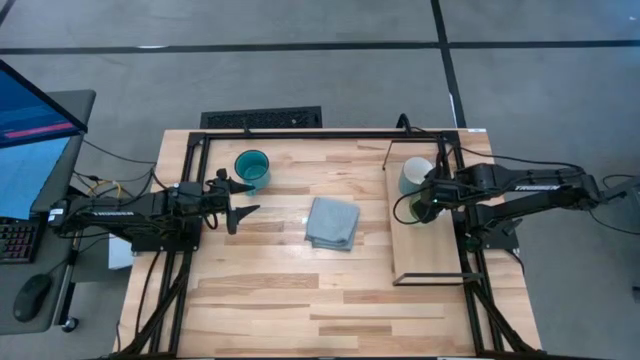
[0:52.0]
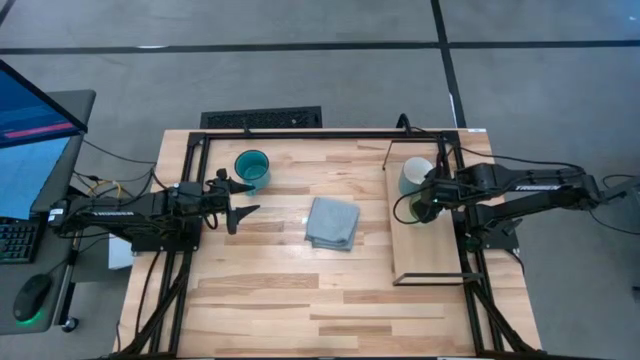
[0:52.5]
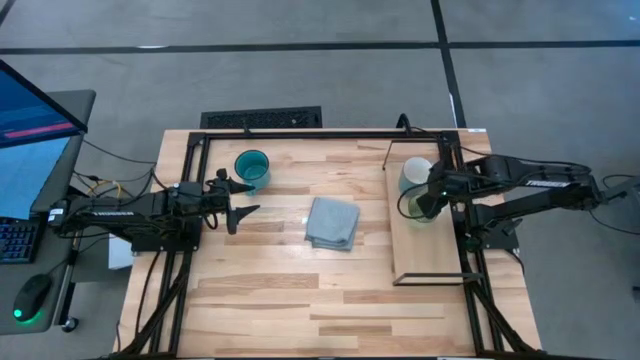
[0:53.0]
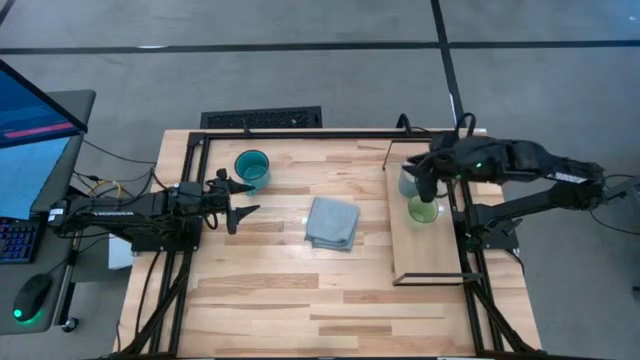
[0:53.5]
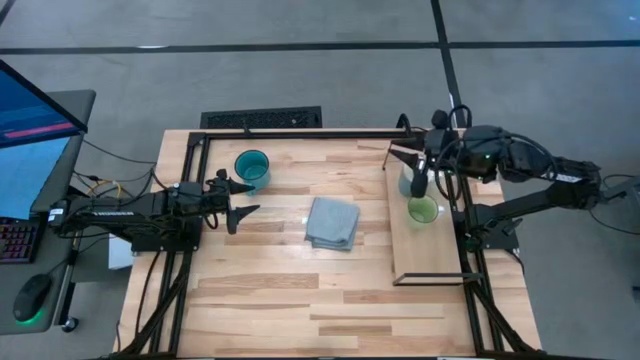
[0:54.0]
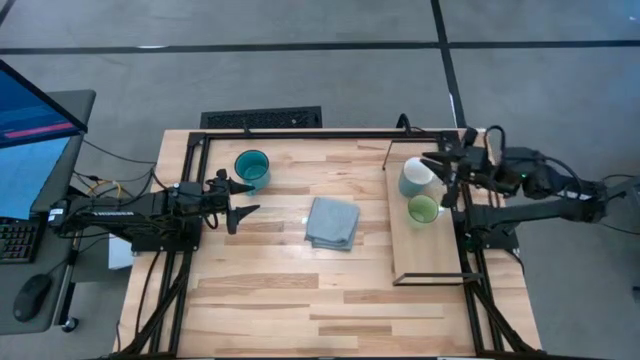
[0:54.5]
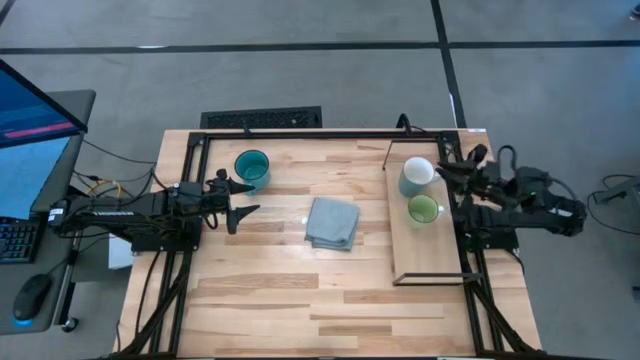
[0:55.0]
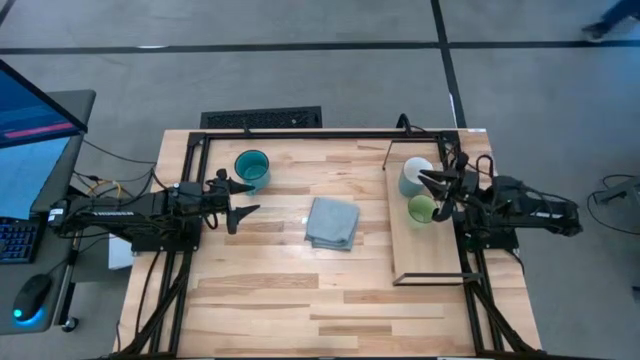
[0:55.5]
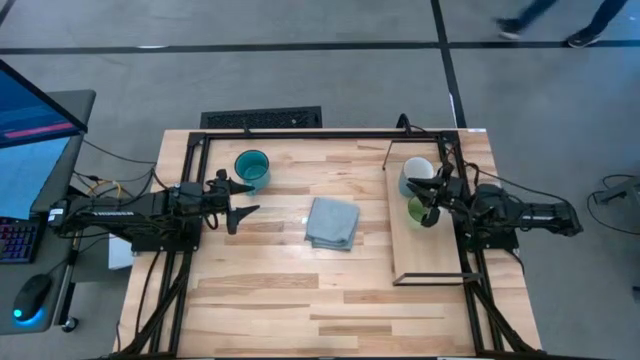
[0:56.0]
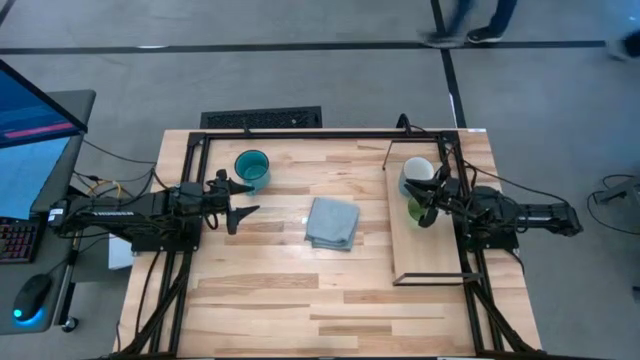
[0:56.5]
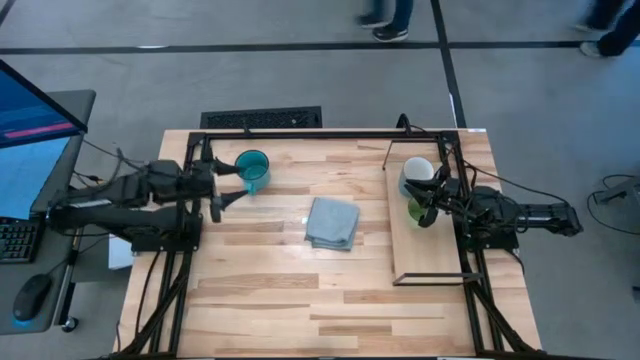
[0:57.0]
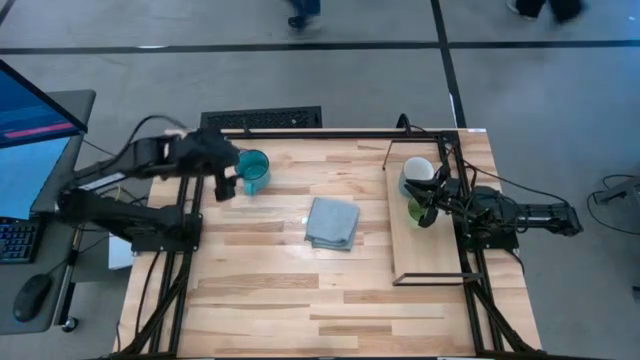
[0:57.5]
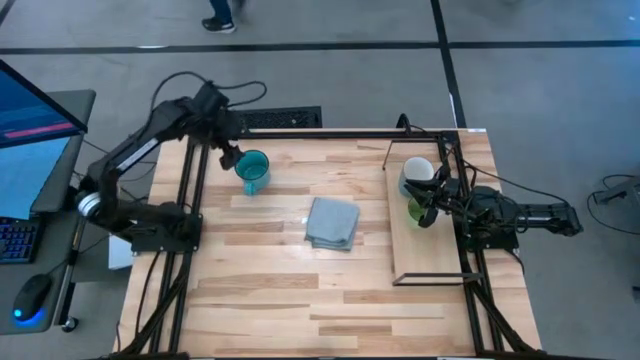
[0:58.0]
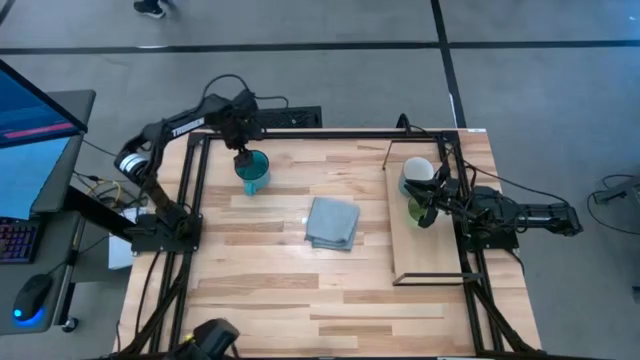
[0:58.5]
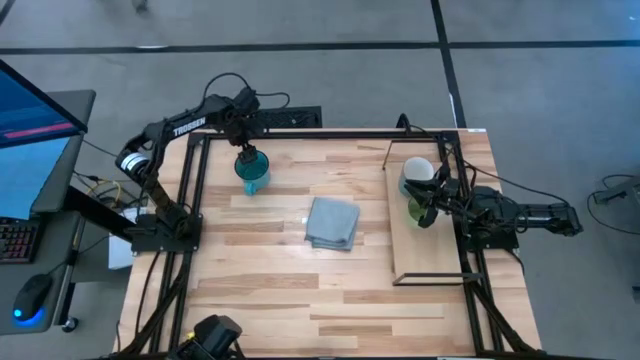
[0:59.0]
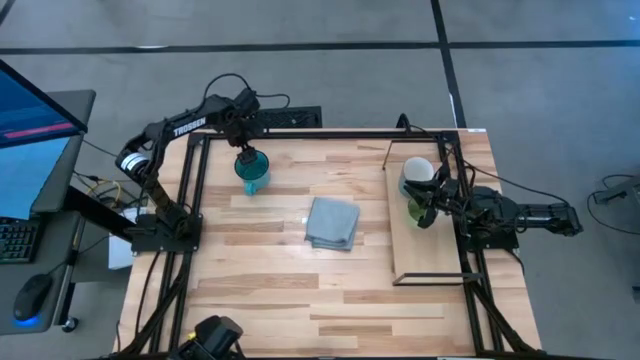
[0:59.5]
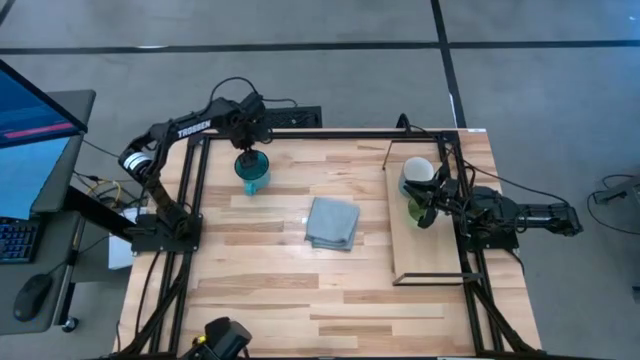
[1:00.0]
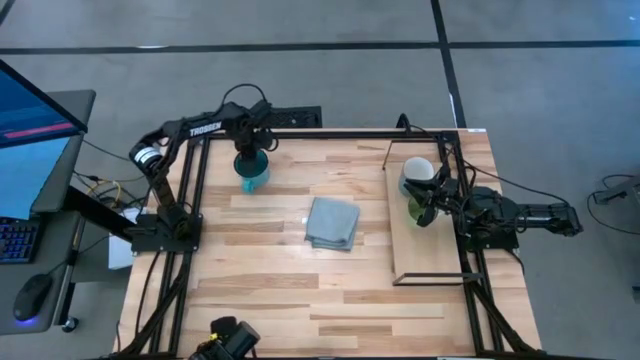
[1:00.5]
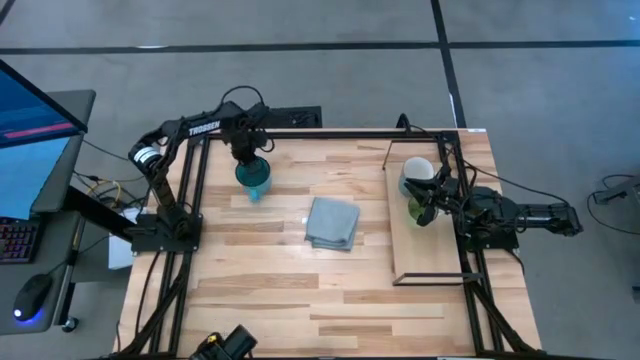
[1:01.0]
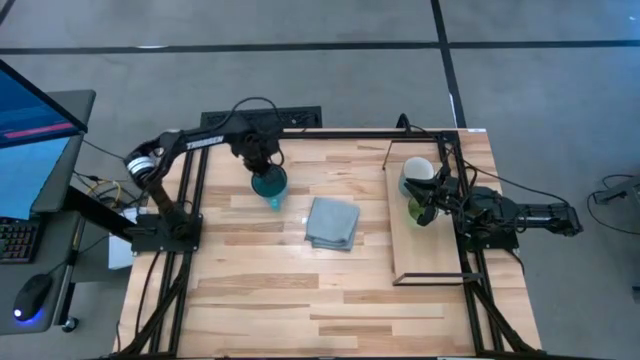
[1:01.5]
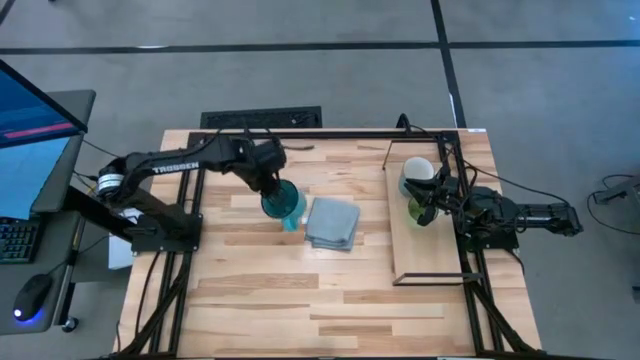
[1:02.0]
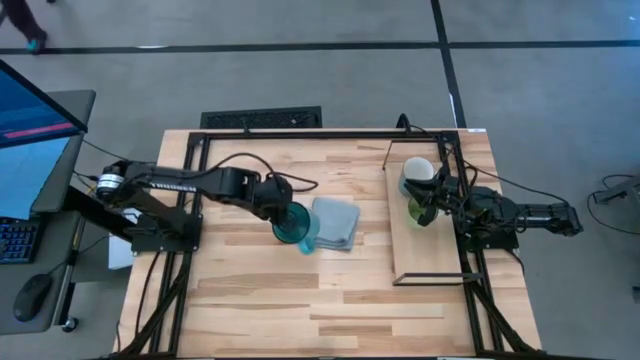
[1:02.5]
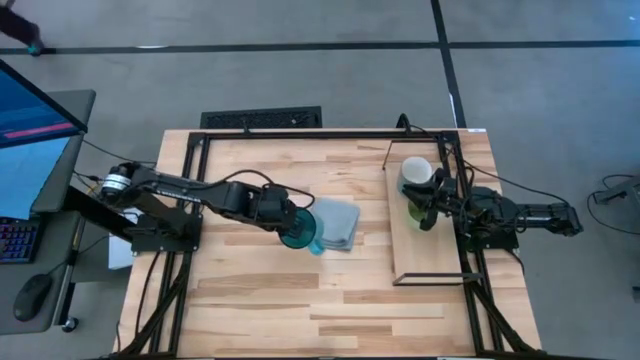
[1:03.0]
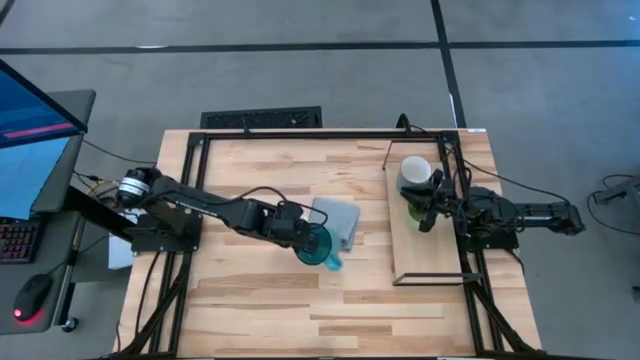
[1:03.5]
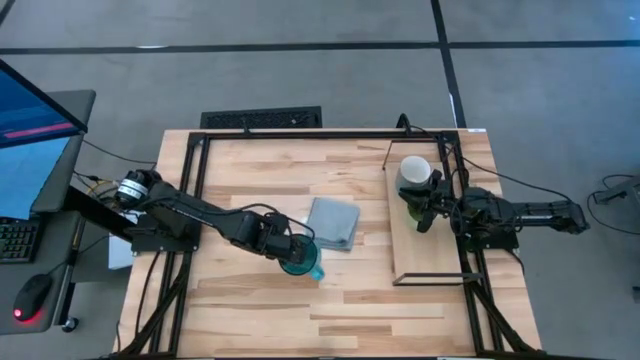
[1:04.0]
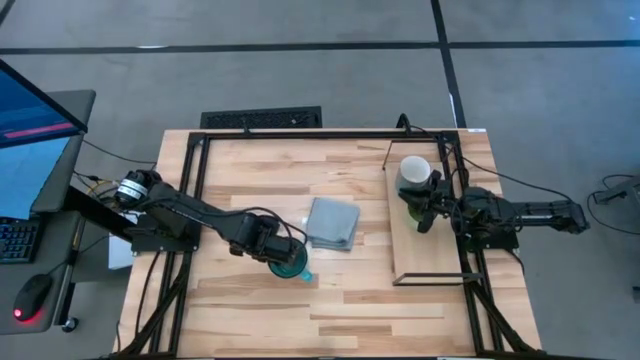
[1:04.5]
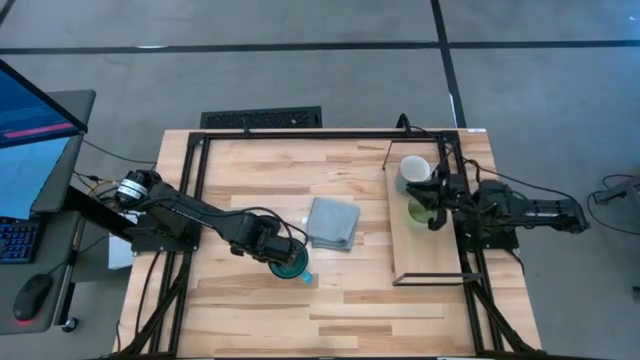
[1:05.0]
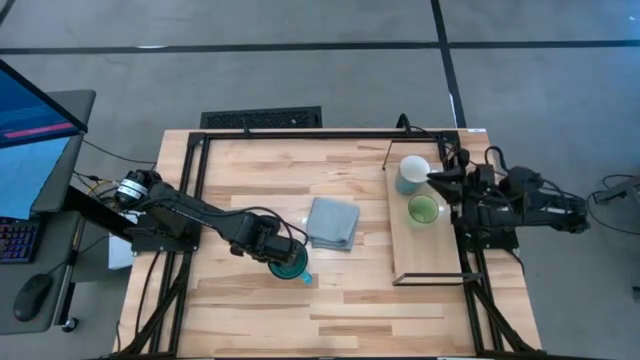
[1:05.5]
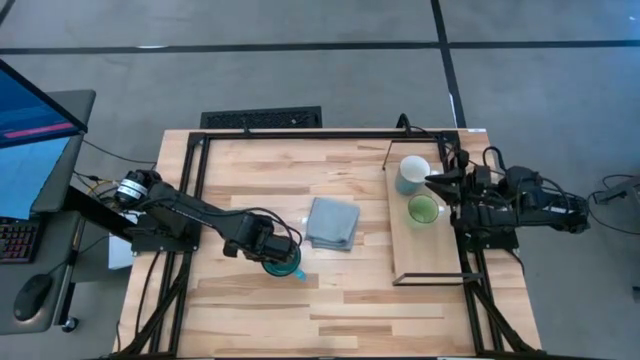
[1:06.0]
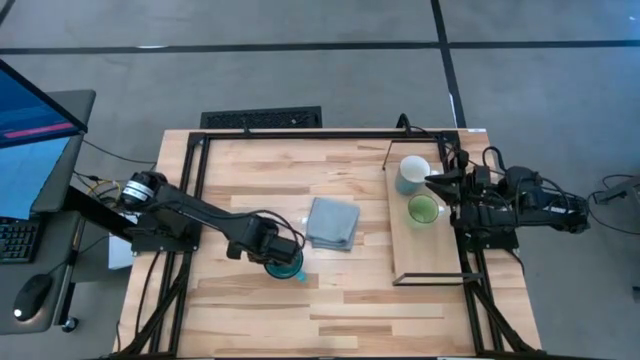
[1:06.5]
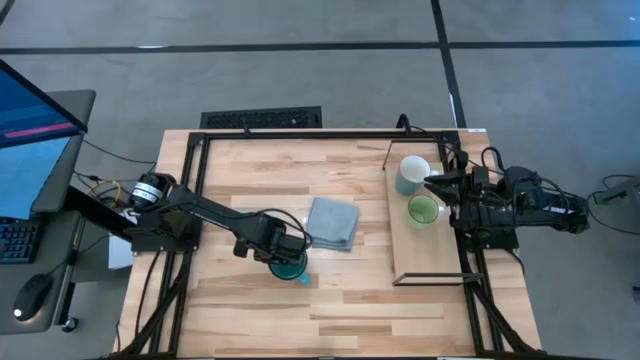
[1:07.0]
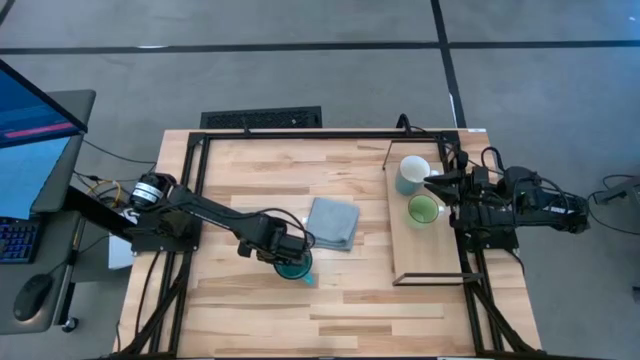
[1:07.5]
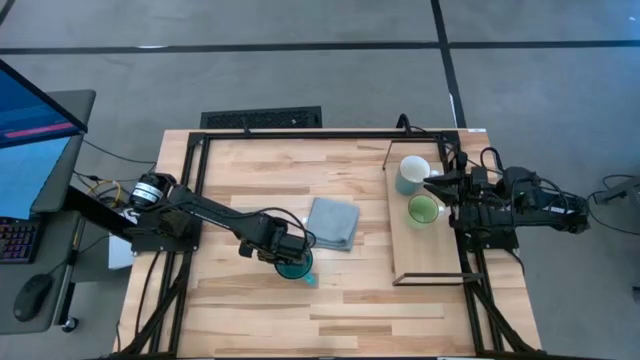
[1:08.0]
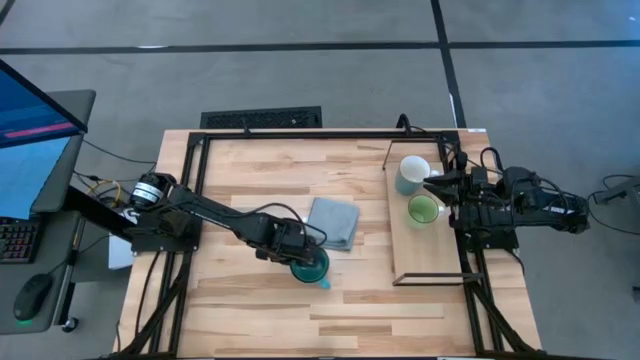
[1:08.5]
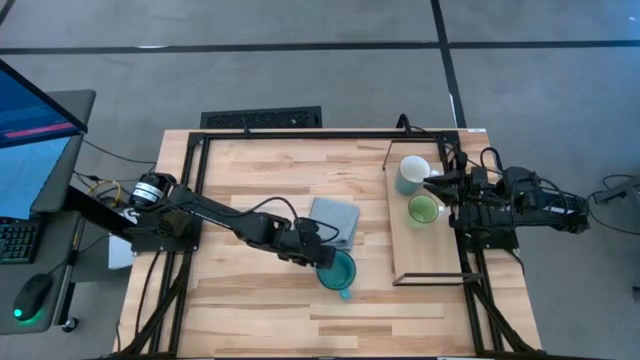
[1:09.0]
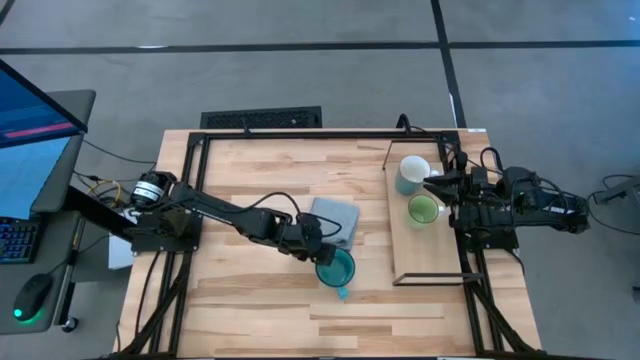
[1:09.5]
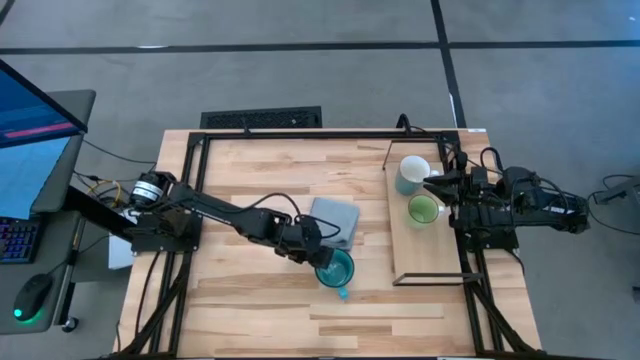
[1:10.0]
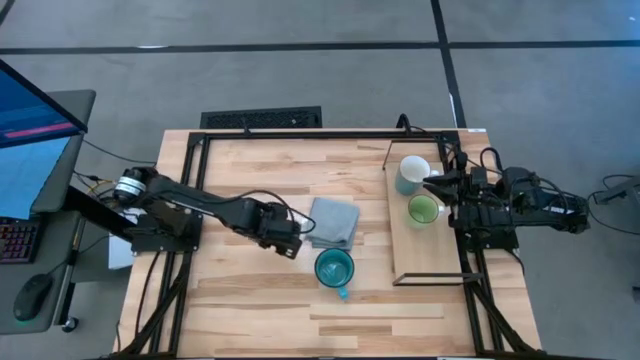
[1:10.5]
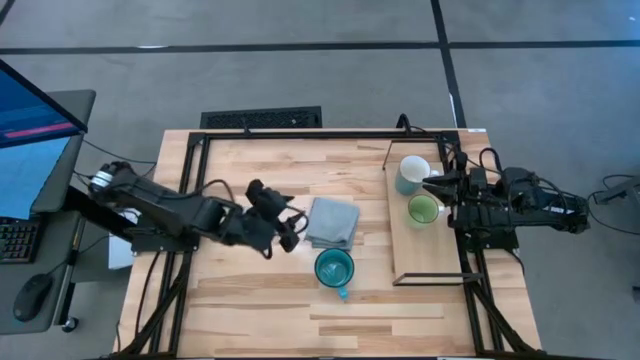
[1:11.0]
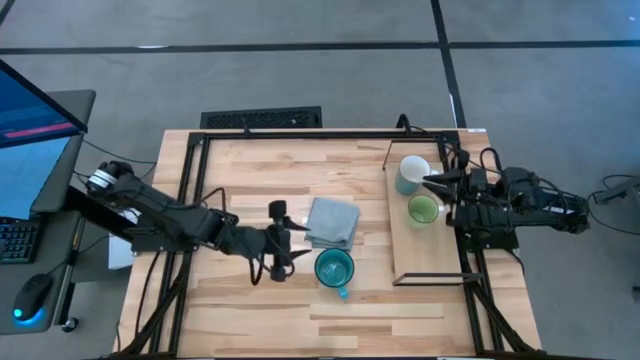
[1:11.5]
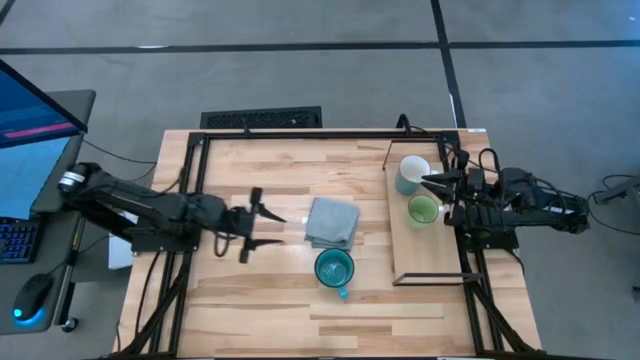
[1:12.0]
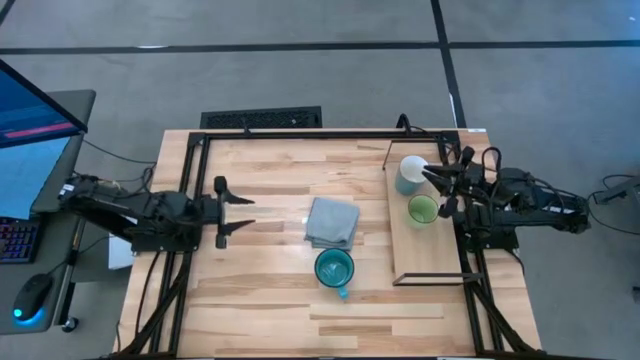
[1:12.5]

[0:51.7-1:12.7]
Task: Stack small to large cups/mugs on shelf
Put the blue mug on the shelf
